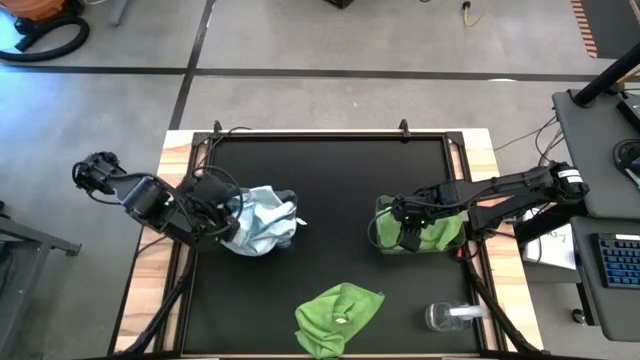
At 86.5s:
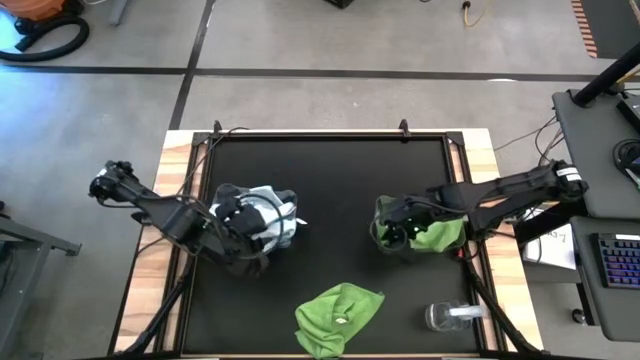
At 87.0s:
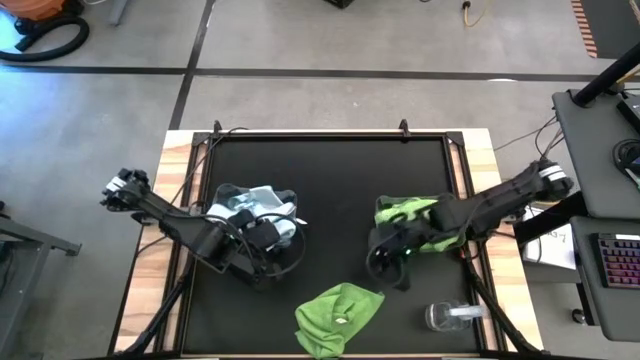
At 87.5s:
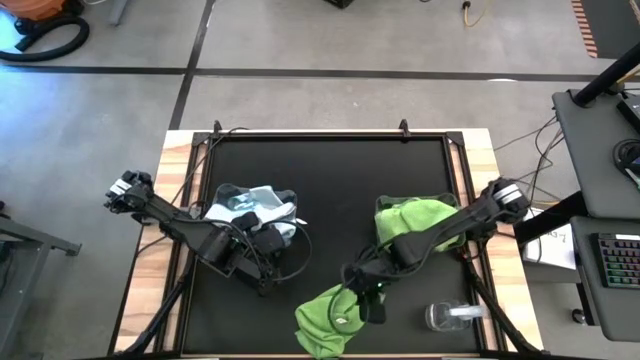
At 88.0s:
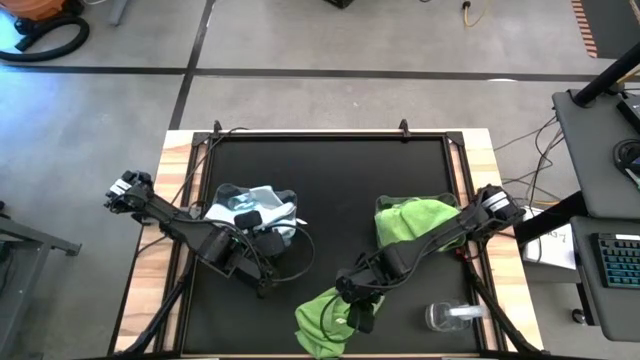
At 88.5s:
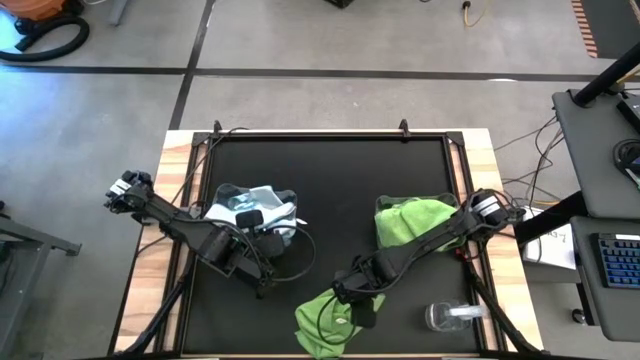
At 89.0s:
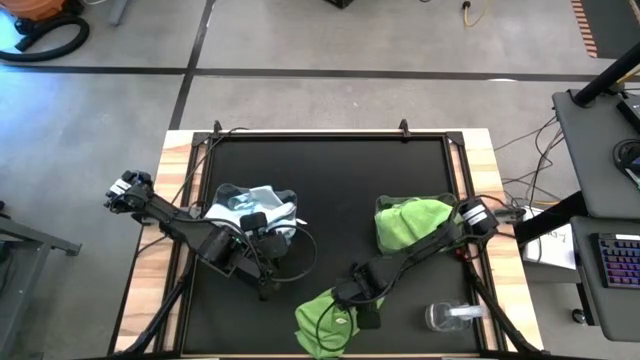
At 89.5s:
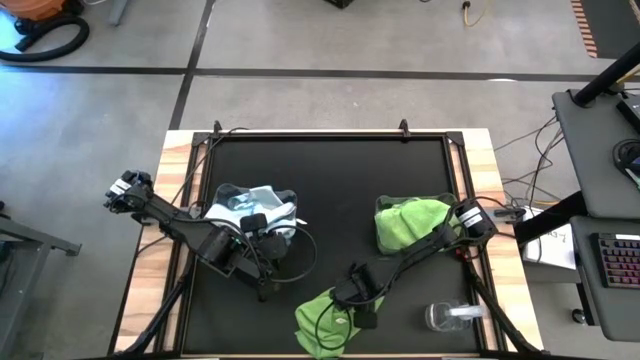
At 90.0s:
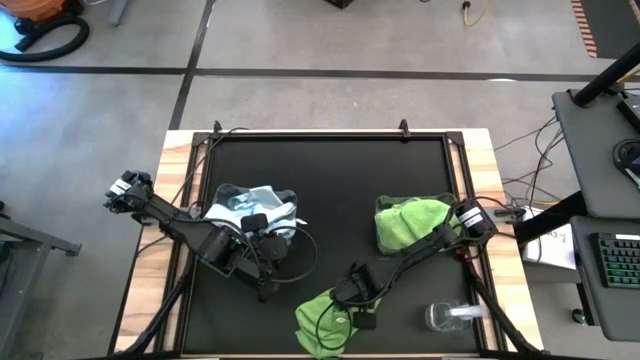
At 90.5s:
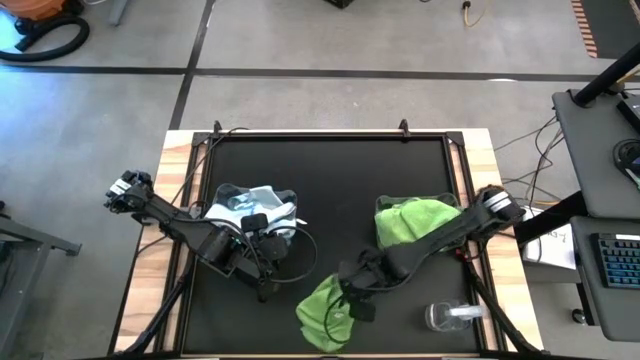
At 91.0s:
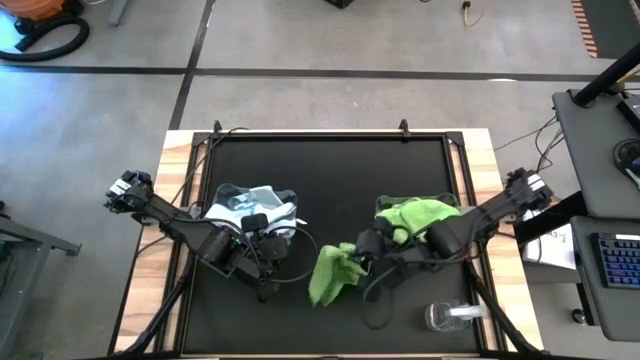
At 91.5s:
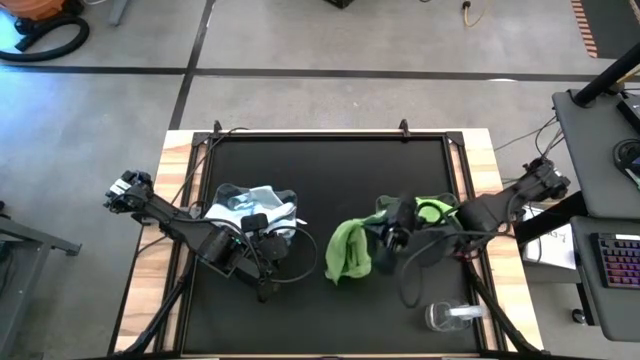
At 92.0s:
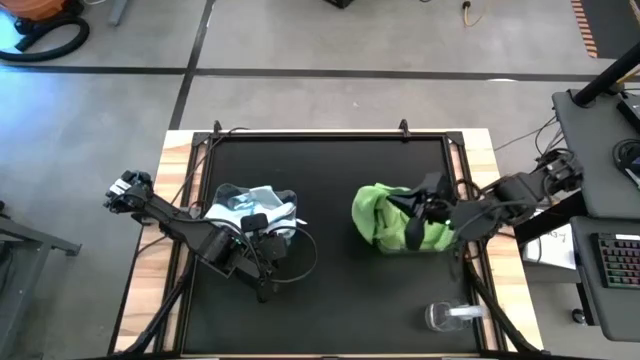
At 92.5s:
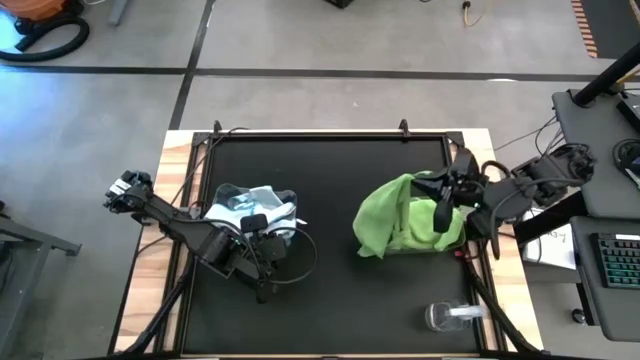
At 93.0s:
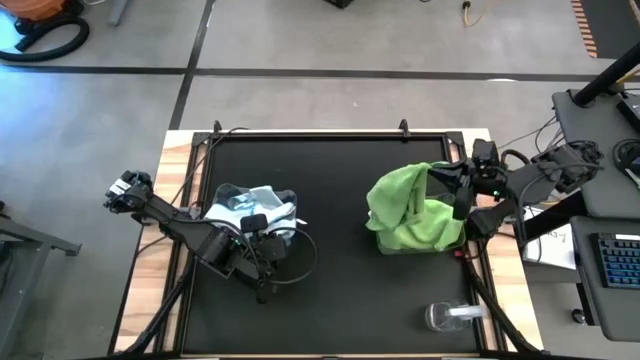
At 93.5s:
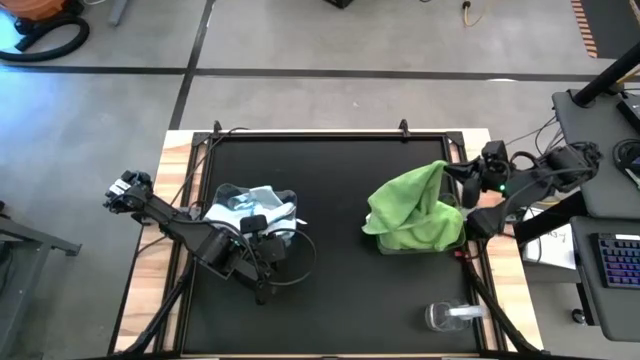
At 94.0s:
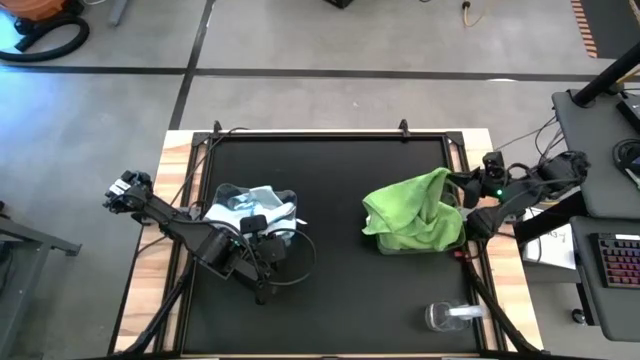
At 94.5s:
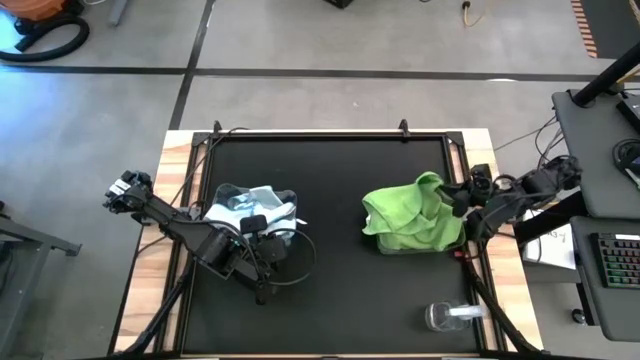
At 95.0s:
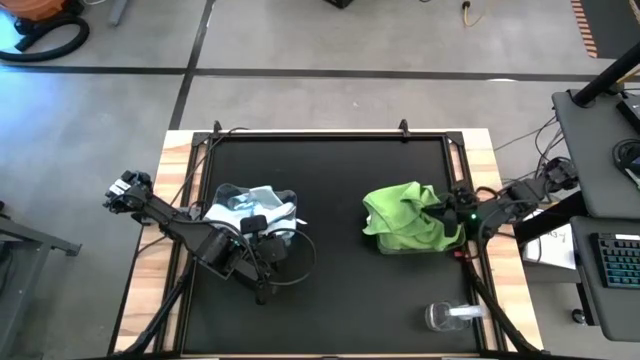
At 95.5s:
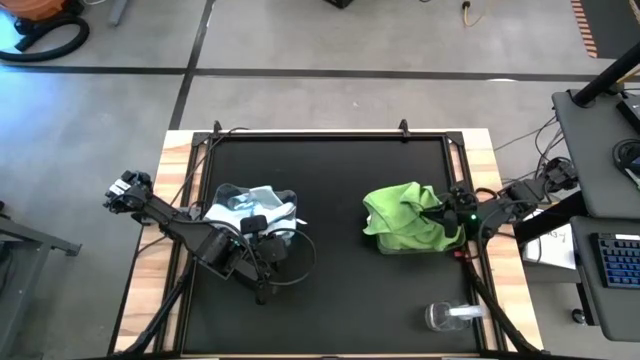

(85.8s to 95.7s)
Task: Sort microfiber towel by color & place in baskets
Put the green towel into the right transparent bin

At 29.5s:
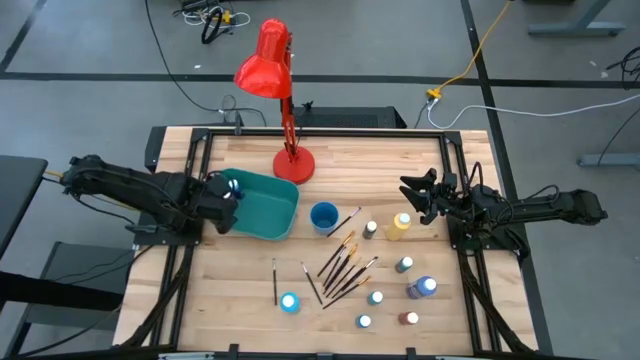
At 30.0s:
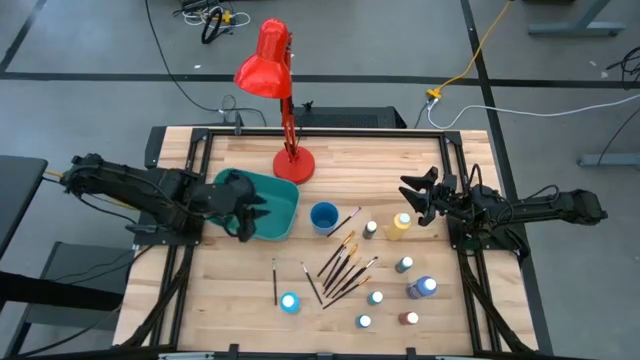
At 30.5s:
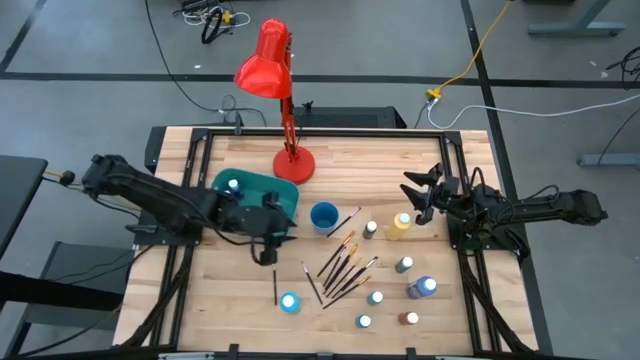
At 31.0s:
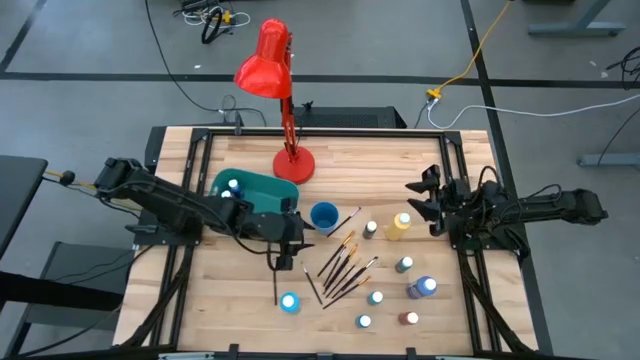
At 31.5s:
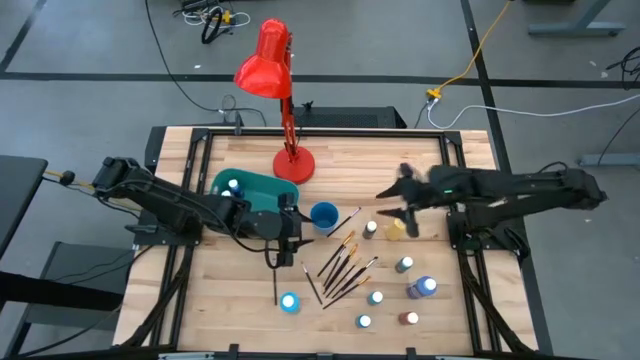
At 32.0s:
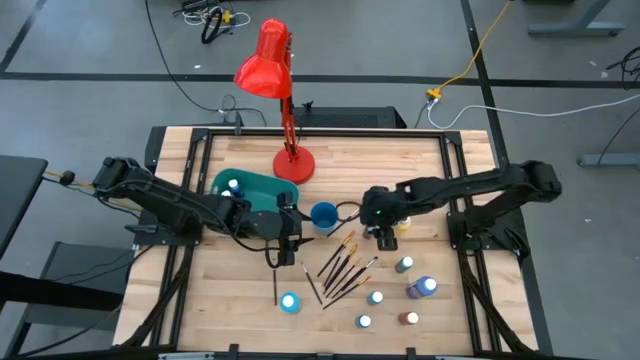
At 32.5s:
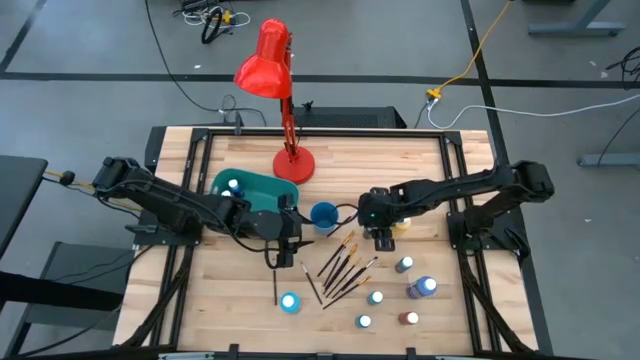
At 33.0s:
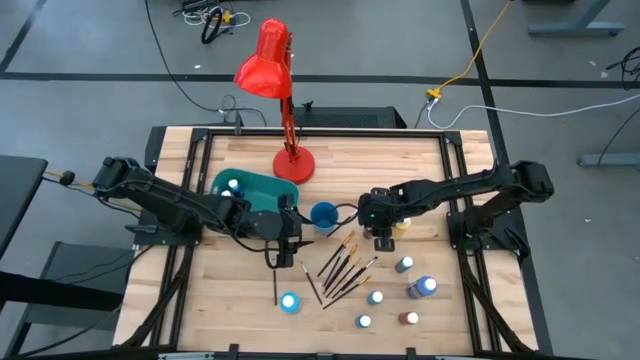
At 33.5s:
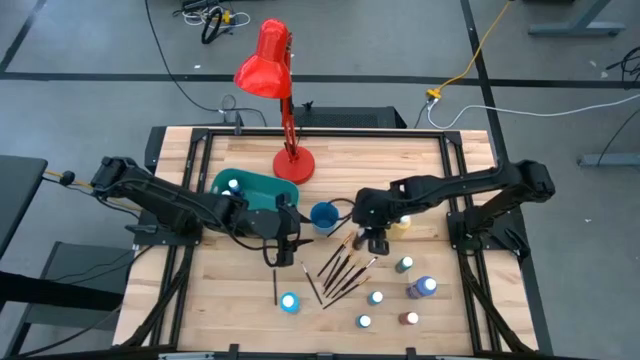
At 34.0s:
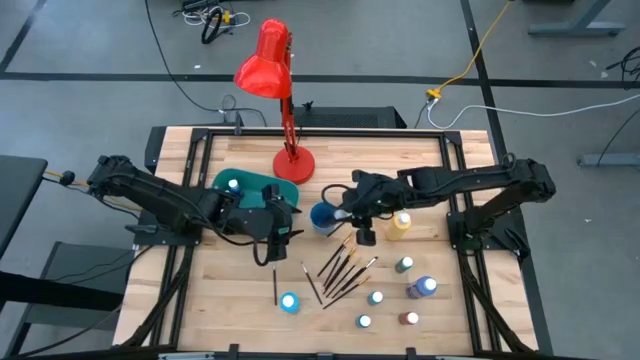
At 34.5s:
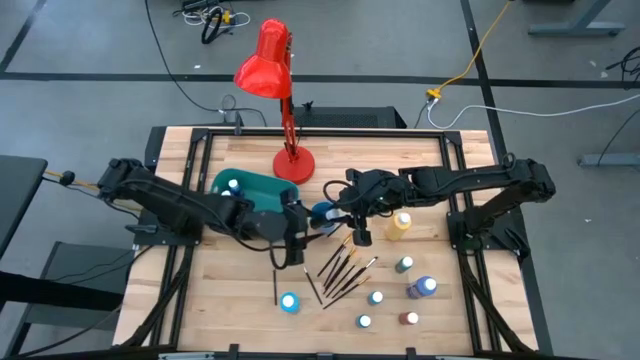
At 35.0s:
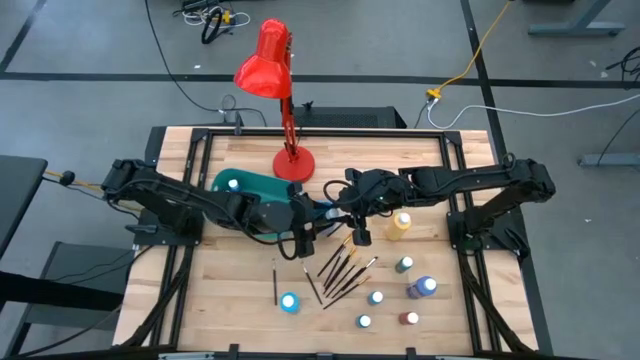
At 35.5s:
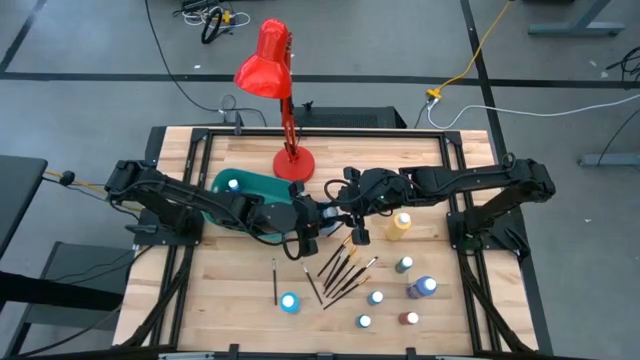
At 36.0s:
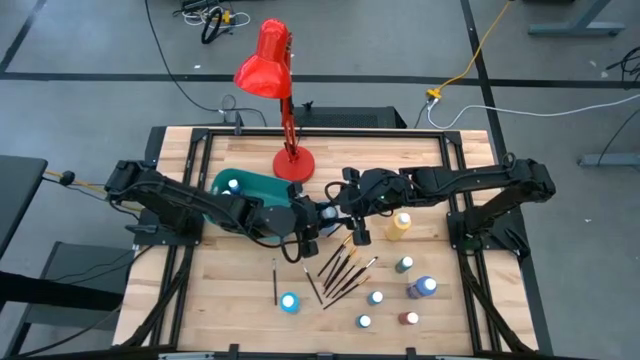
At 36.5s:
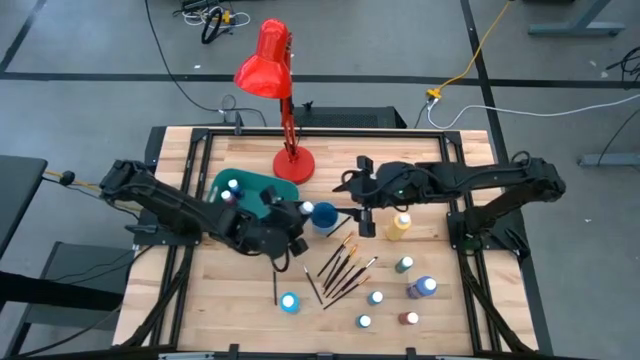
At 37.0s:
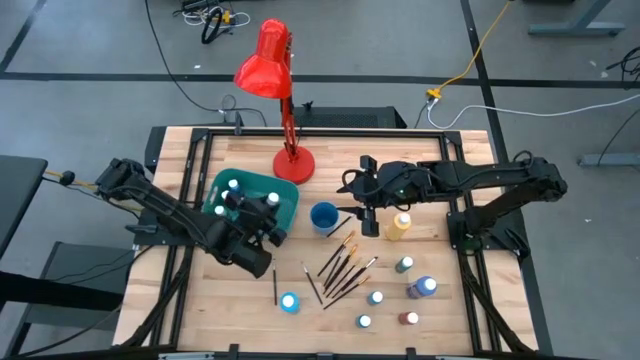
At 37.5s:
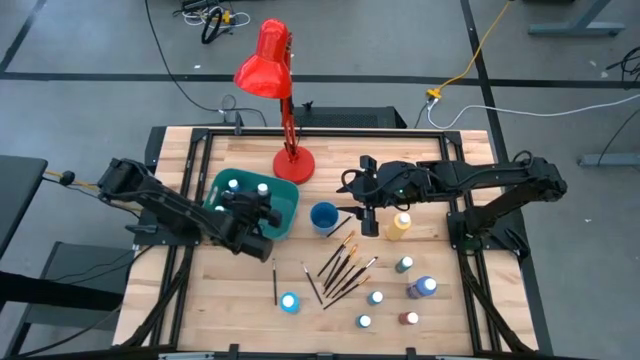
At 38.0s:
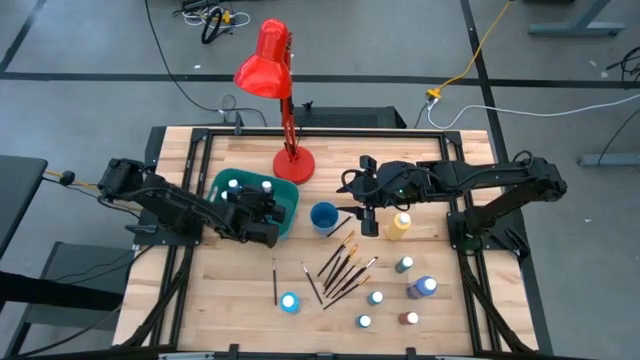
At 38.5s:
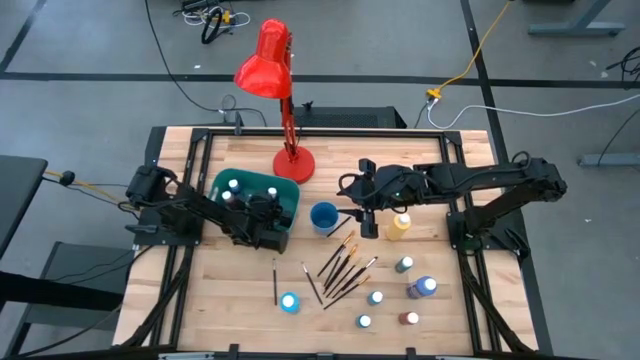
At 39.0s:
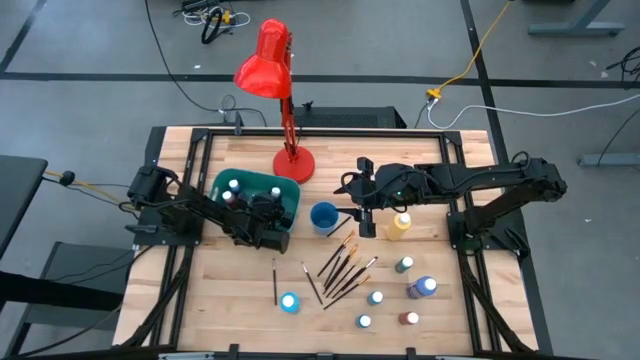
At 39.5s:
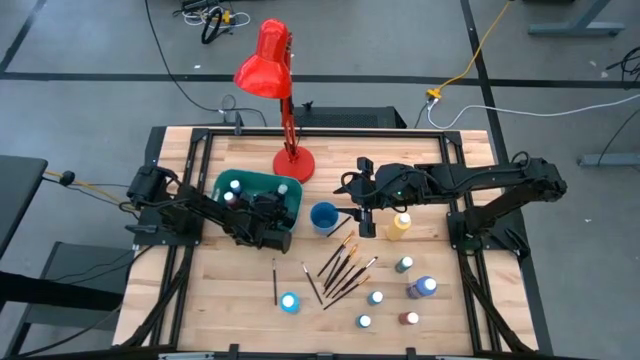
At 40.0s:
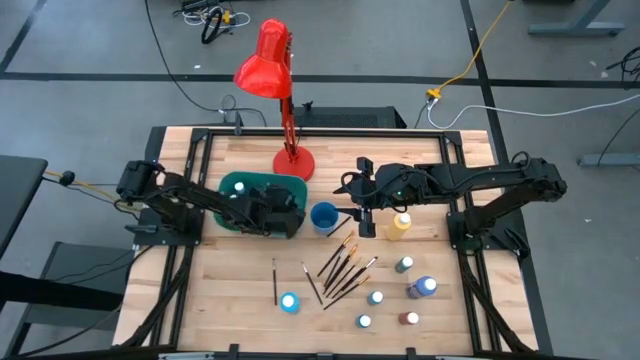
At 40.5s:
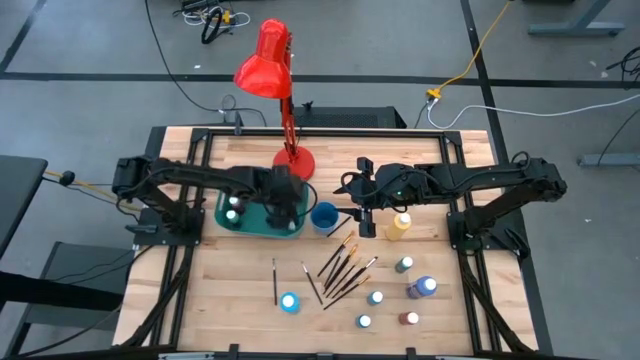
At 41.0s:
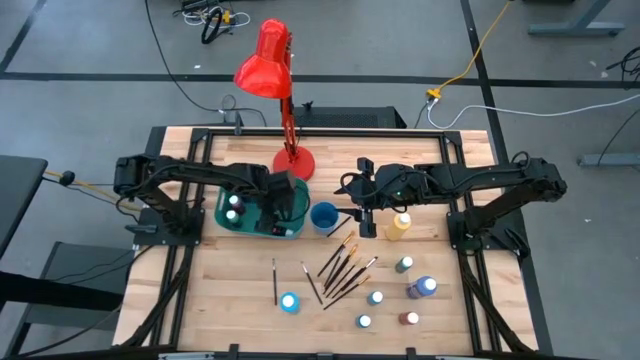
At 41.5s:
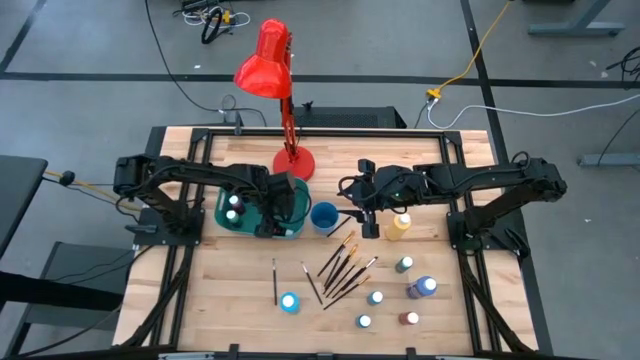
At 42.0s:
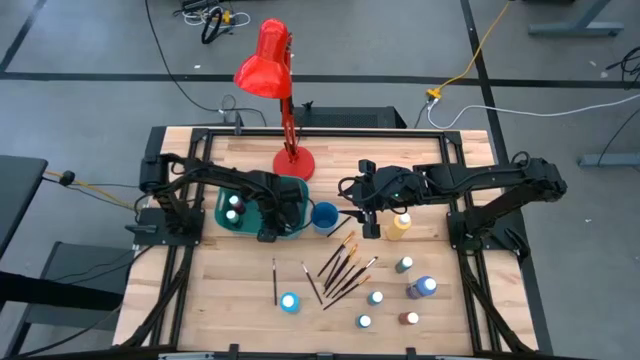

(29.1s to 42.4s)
Task: Pick & Place Paint Supplies
Put the black paint bottle into the green bin
